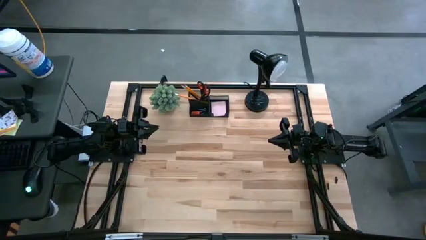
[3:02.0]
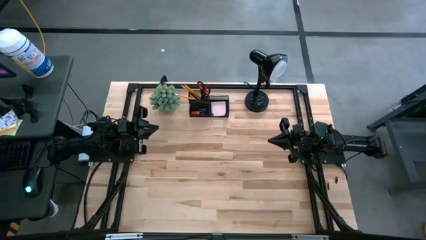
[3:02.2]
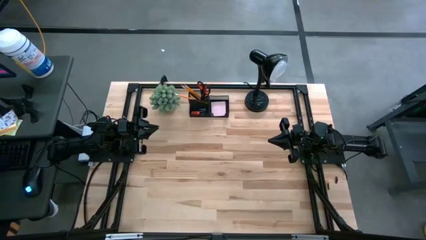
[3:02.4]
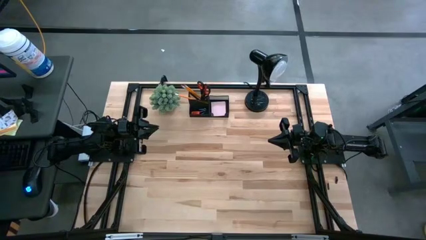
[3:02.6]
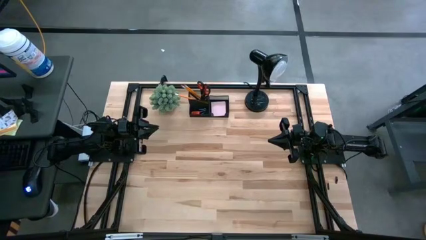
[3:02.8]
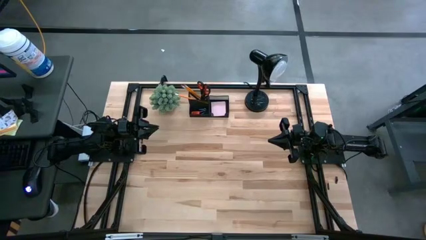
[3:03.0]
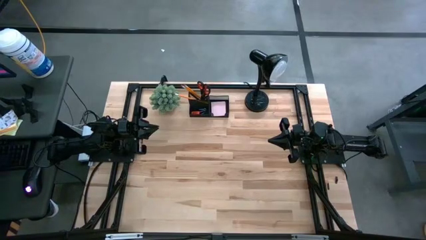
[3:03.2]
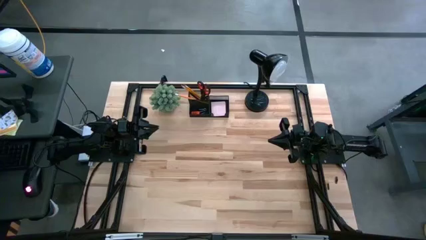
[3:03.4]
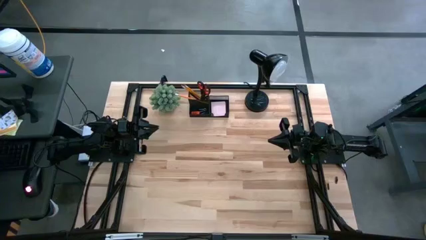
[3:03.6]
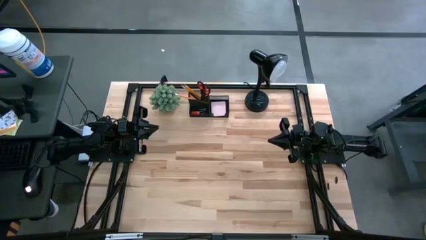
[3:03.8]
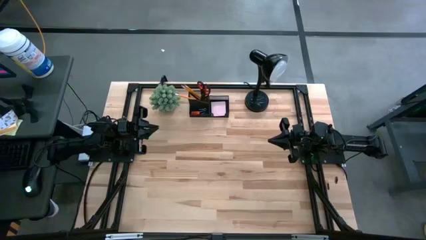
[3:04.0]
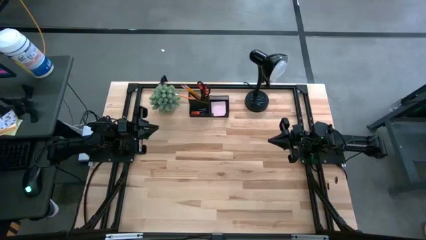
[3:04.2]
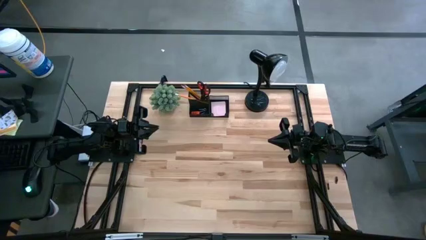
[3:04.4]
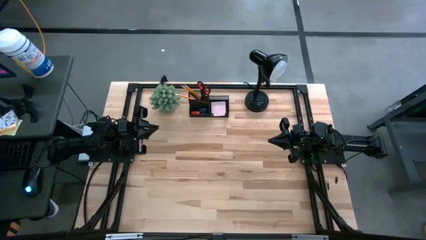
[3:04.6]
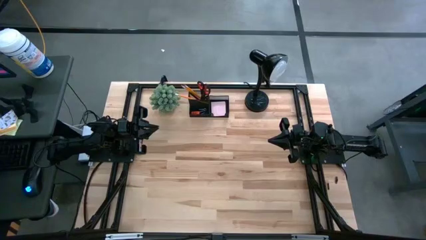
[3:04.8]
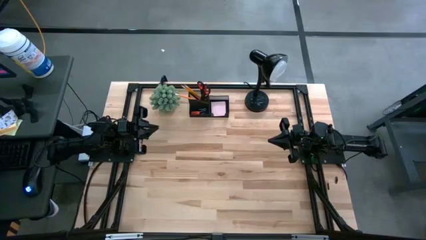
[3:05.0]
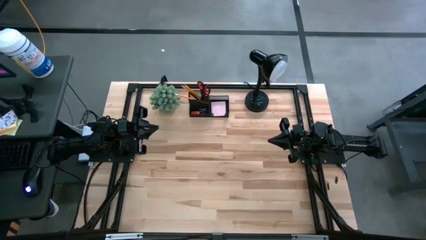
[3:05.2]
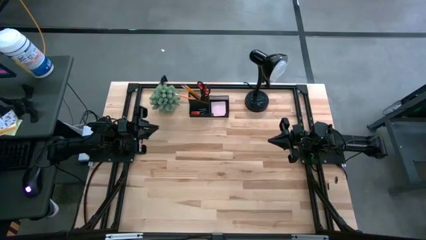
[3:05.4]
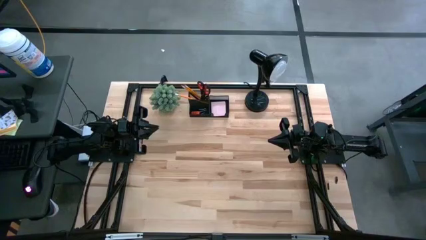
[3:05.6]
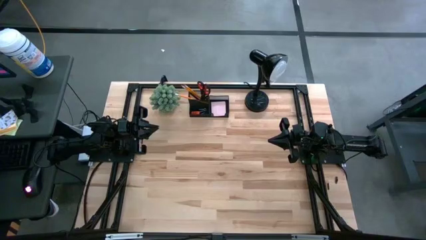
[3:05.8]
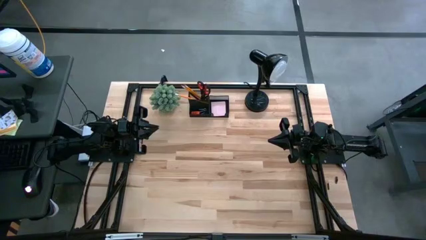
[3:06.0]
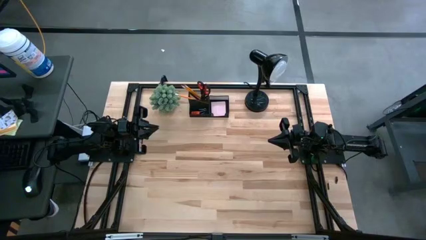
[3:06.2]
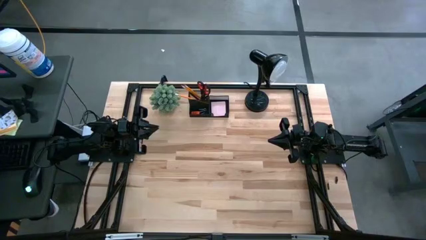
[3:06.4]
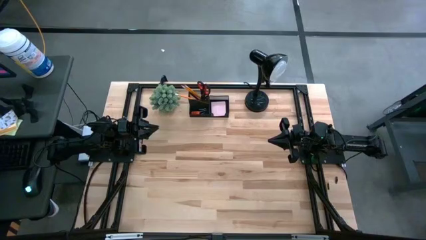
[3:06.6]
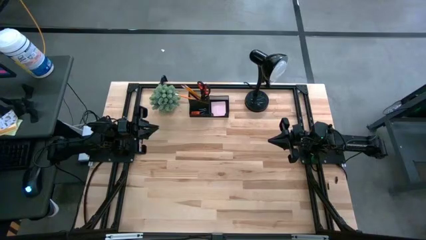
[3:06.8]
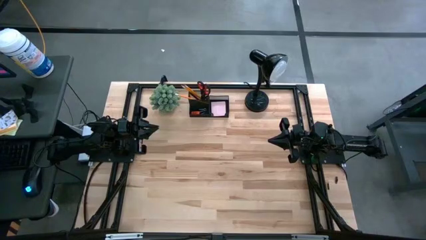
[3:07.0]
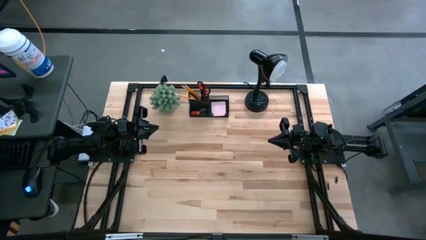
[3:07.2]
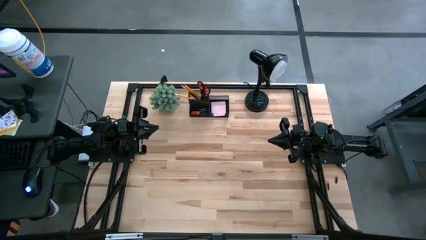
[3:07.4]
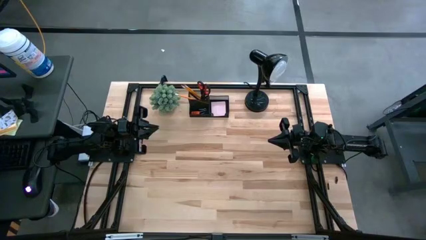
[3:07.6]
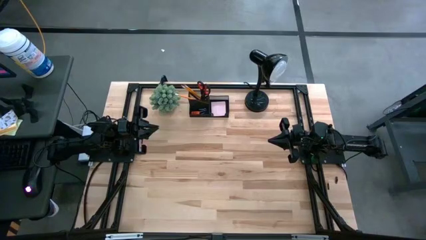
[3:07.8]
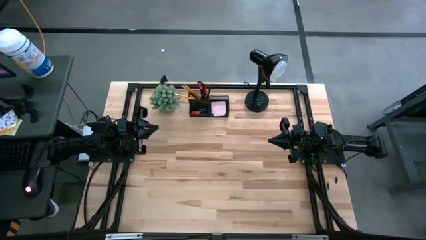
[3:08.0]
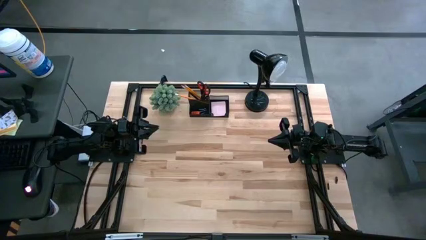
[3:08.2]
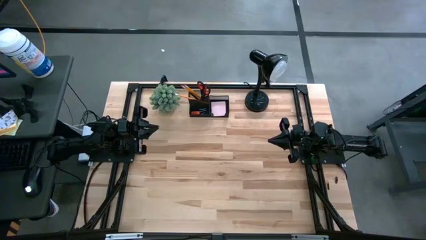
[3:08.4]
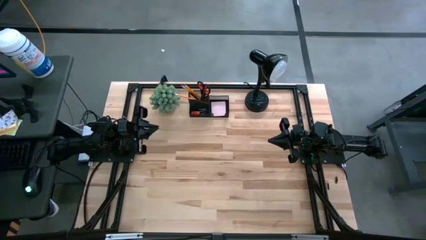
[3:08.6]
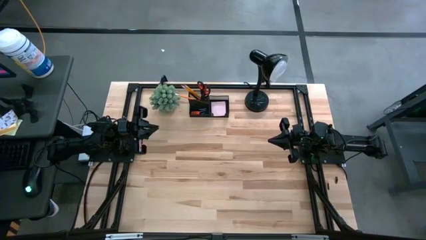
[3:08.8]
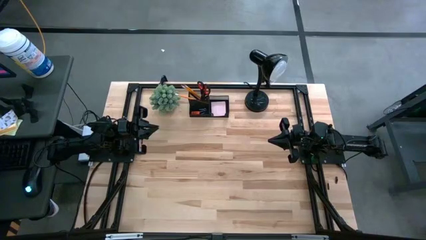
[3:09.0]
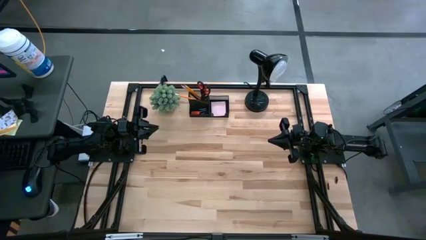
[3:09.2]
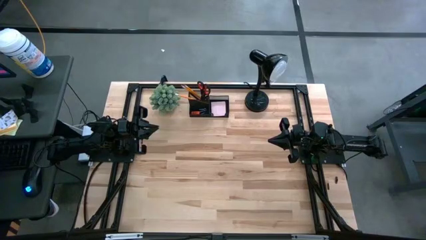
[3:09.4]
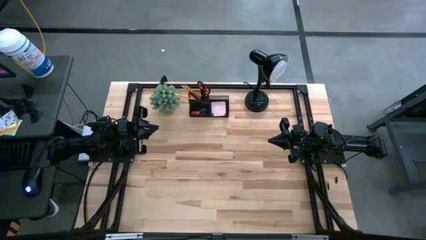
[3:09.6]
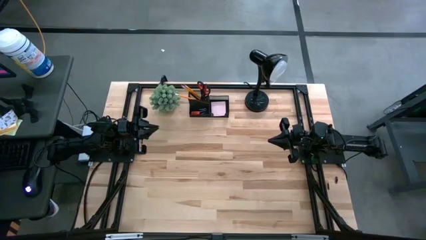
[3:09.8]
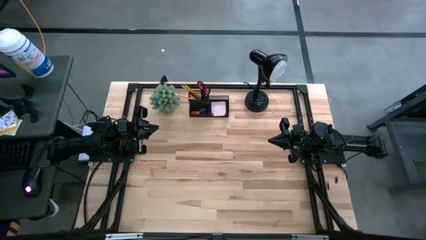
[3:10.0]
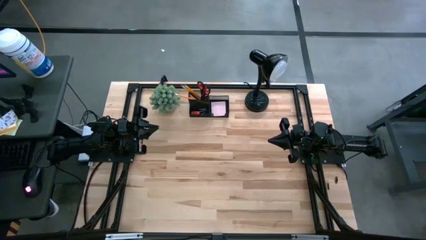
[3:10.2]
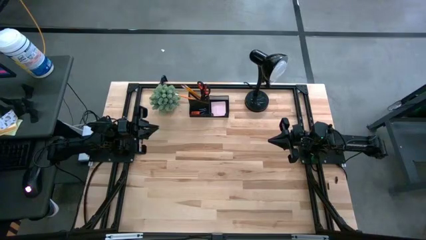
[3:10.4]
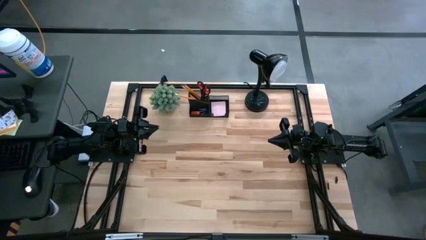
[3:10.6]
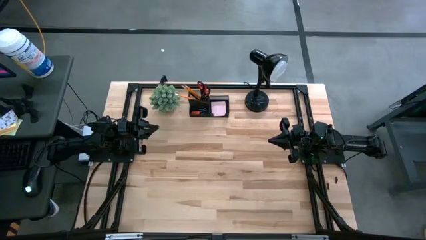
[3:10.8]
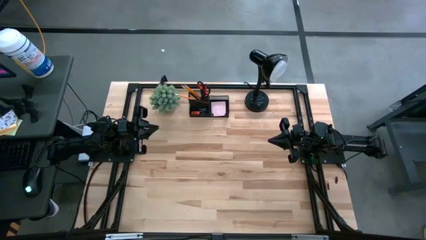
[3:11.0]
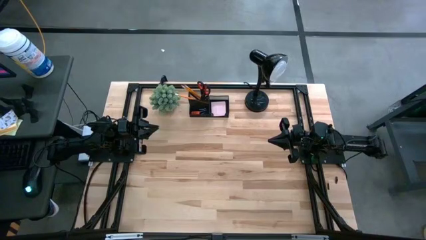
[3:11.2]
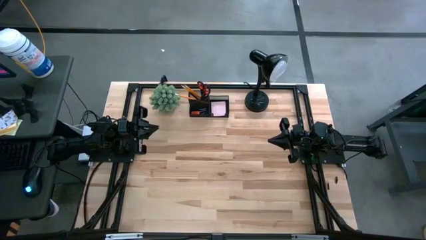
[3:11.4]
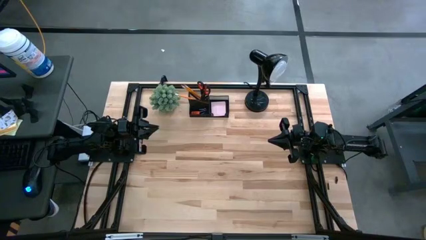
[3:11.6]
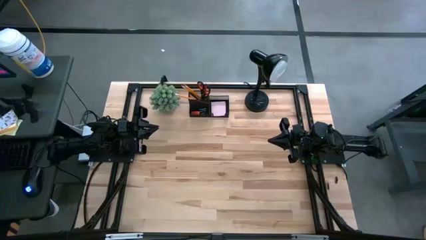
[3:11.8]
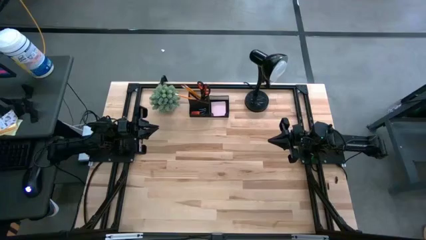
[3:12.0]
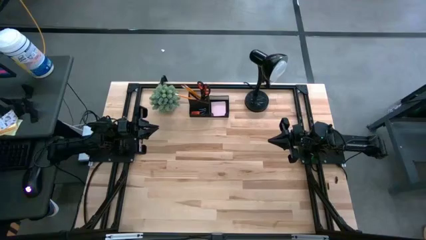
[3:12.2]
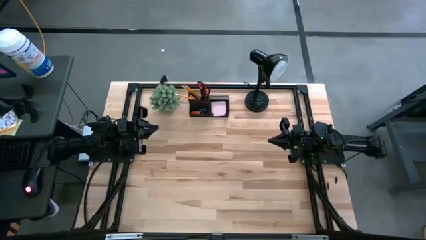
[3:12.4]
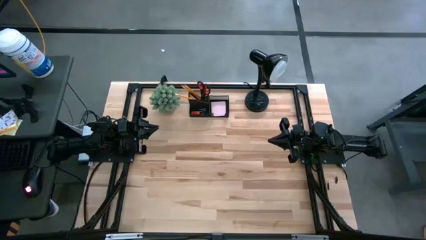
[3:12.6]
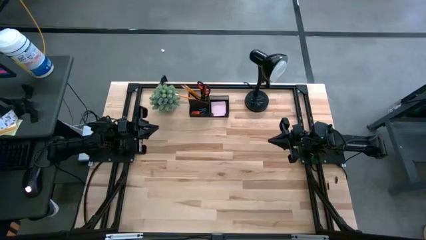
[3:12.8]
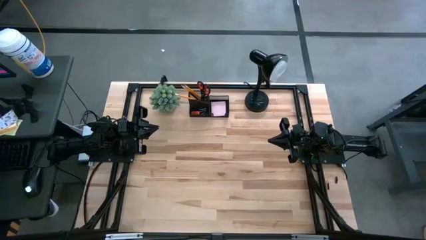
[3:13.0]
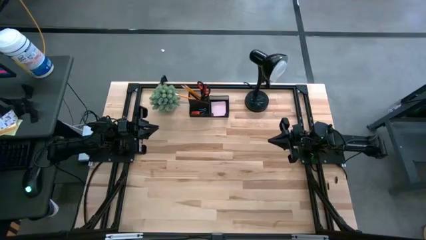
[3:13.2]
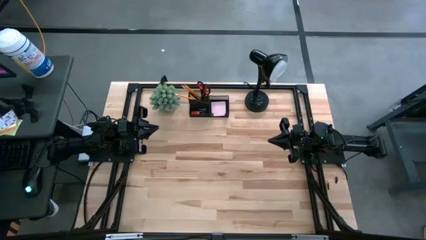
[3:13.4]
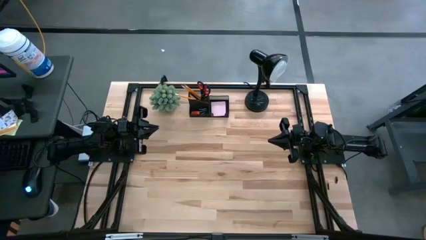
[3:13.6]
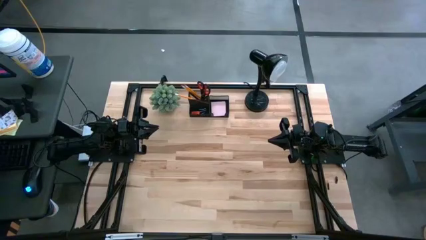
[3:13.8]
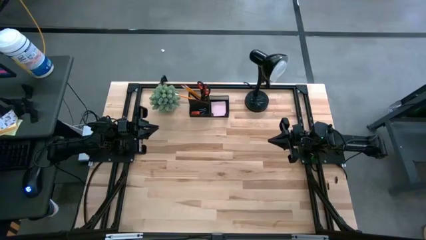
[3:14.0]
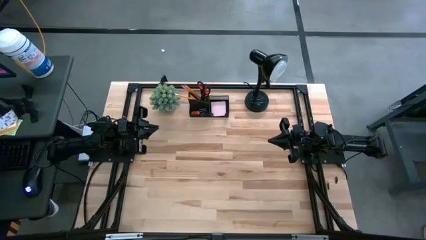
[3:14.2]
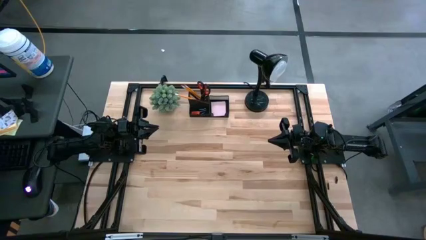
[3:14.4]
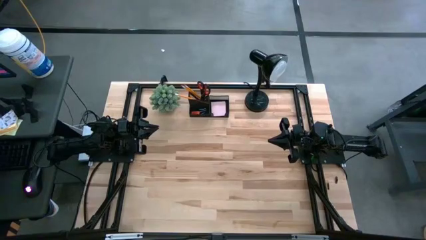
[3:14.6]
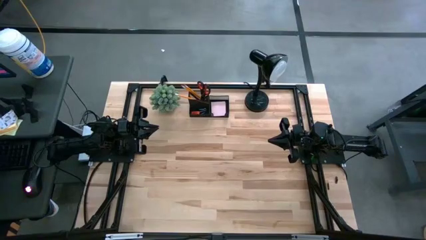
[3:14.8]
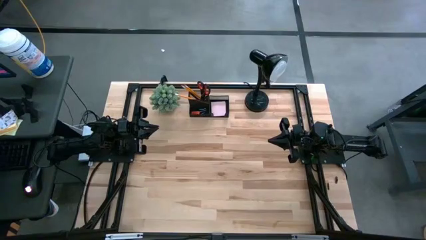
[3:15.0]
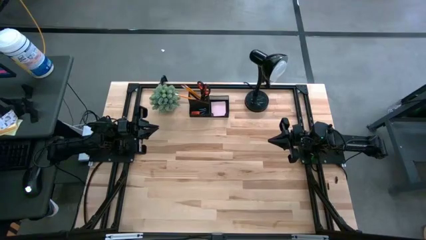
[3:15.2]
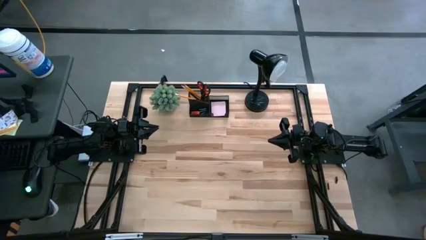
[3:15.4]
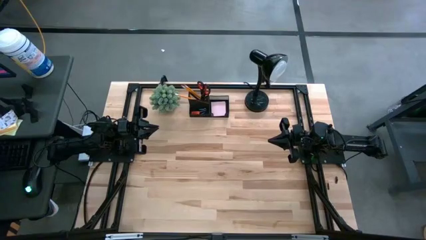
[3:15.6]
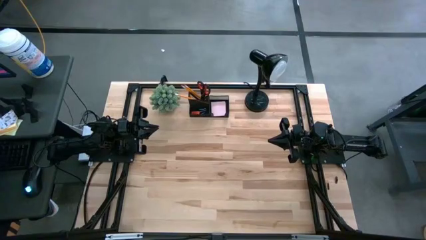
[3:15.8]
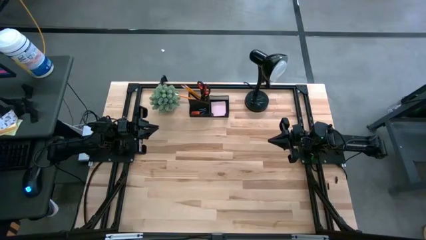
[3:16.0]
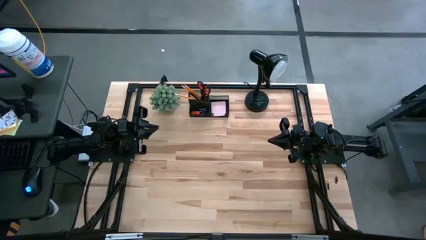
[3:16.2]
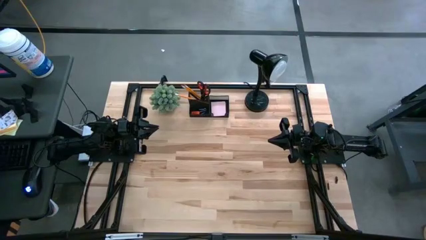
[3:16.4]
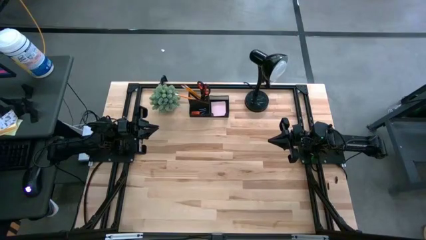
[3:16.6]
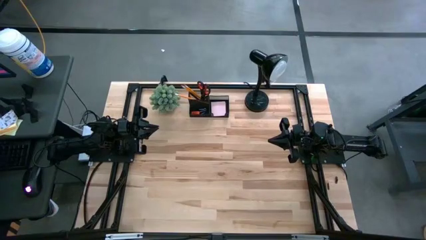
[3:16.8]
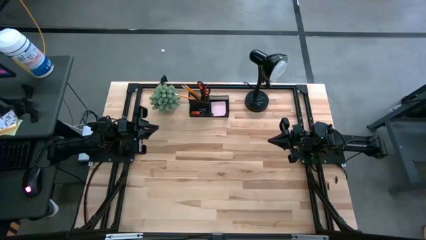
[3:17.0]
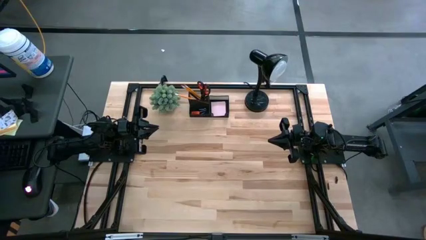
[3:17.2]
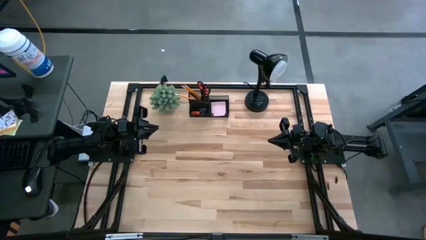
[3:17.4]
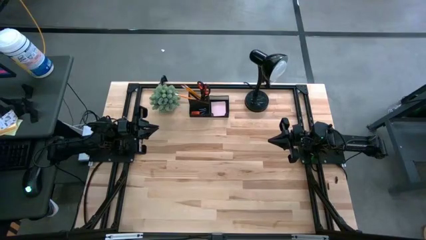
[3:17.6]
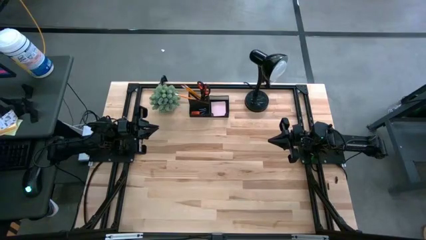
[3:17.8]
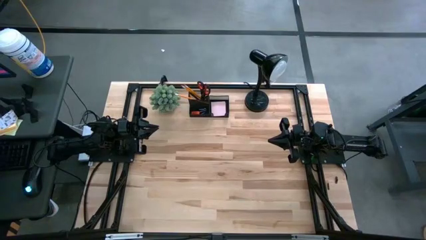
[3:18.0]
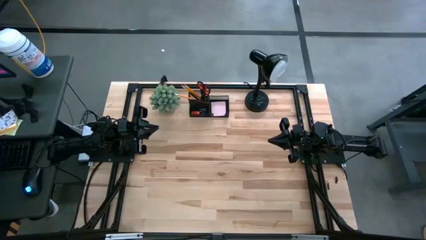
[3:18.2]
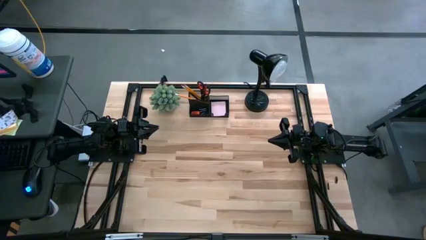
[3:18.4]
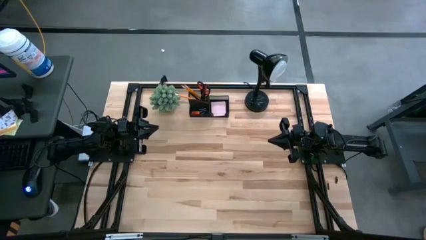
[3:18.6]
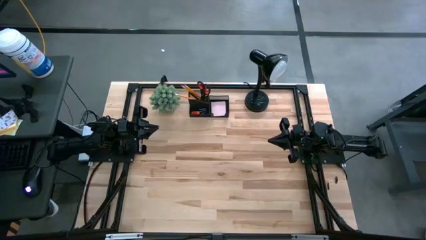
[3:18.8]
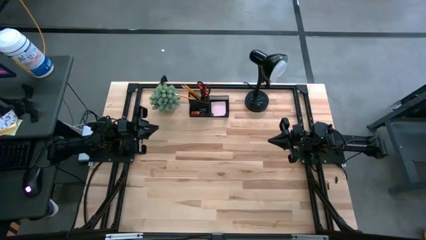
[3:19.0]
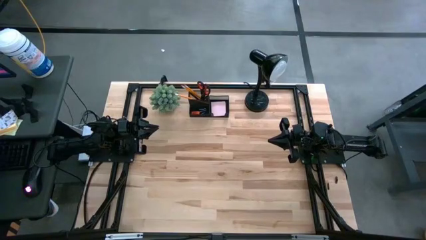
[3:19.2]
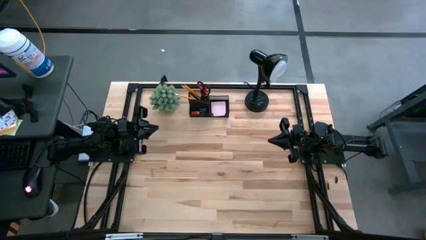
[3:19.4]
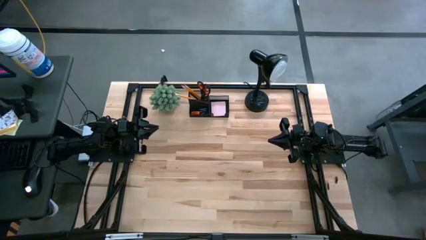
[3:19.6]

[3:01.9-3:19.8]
Task: Pick and place office supplies into organizer
Return to Home Position
